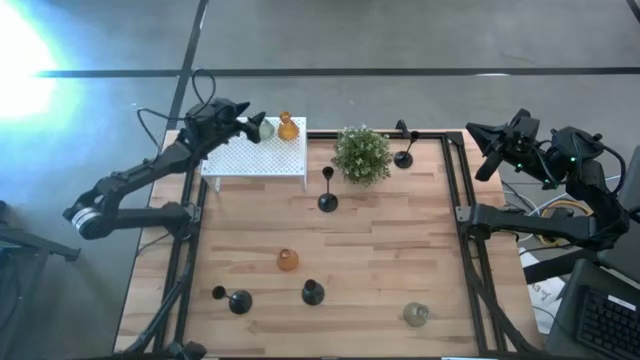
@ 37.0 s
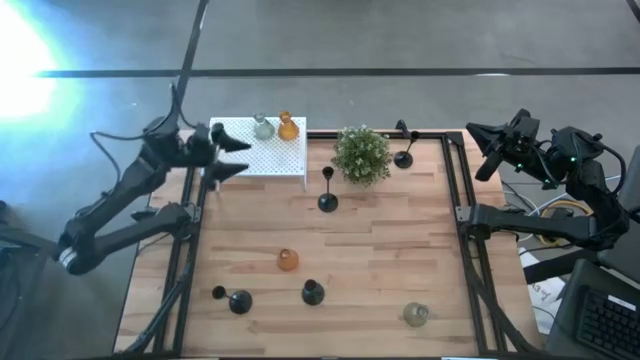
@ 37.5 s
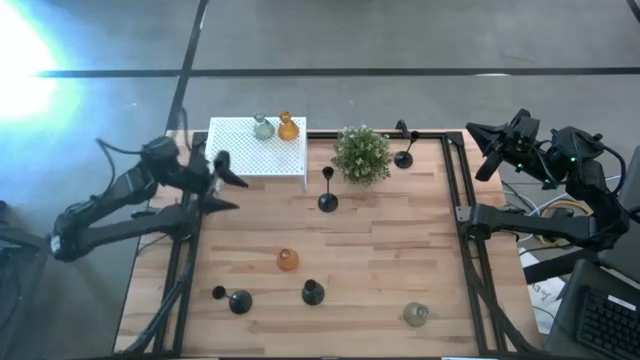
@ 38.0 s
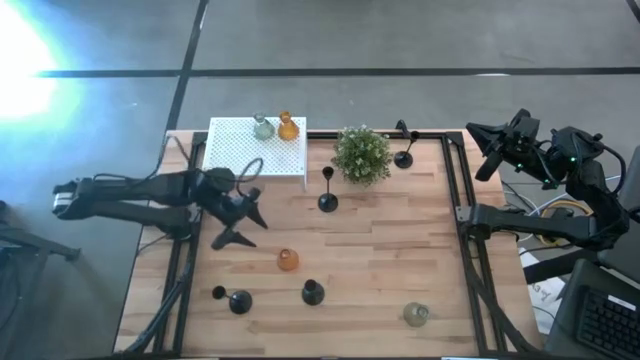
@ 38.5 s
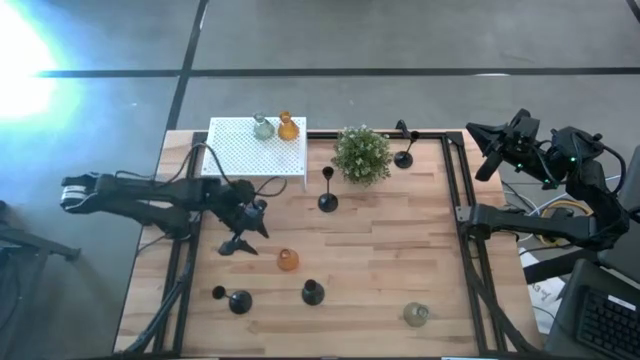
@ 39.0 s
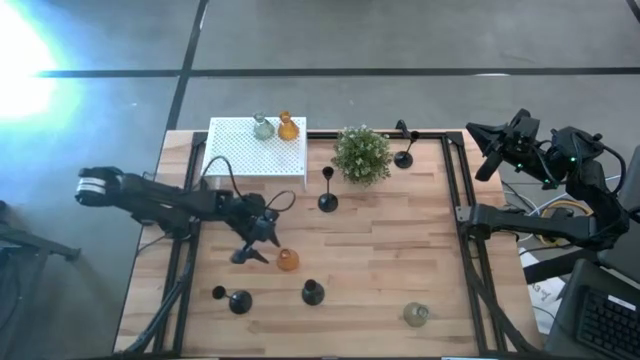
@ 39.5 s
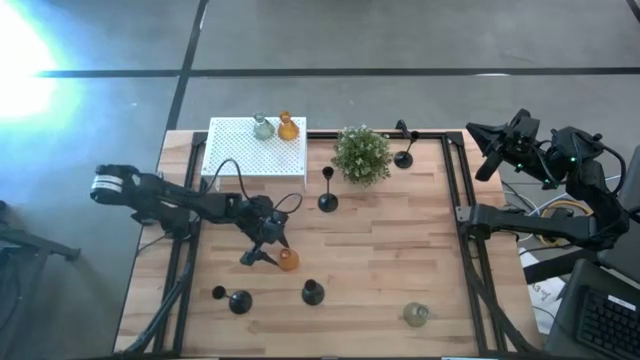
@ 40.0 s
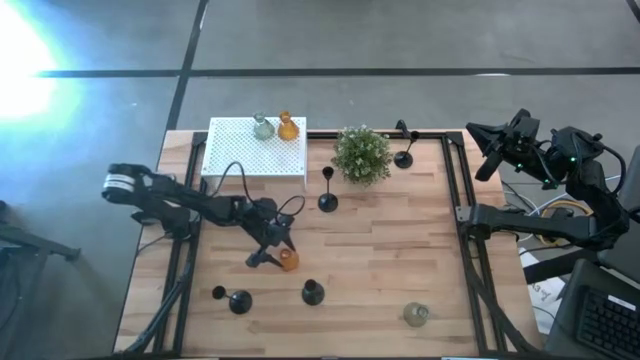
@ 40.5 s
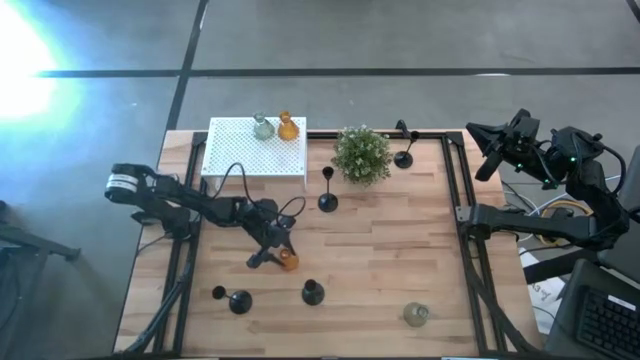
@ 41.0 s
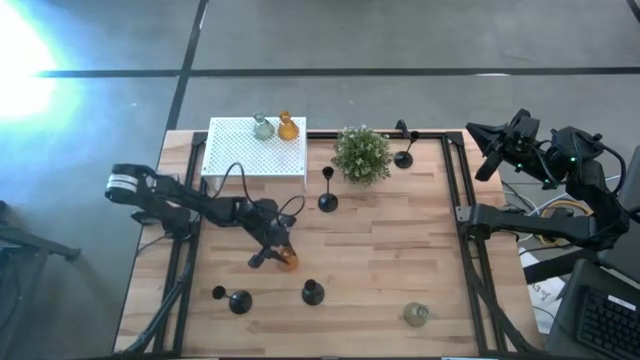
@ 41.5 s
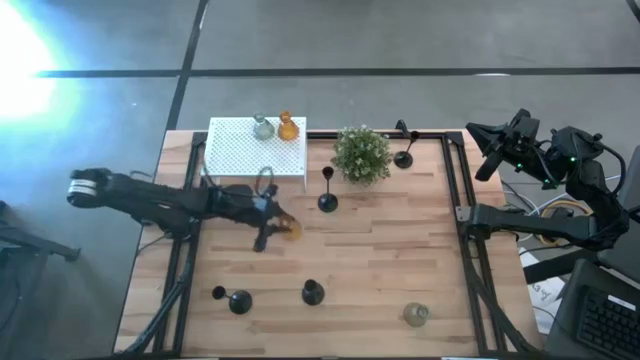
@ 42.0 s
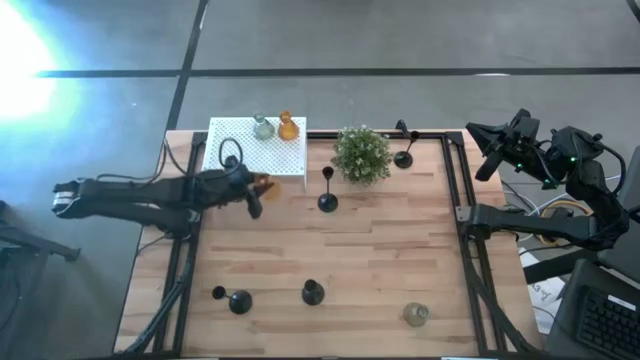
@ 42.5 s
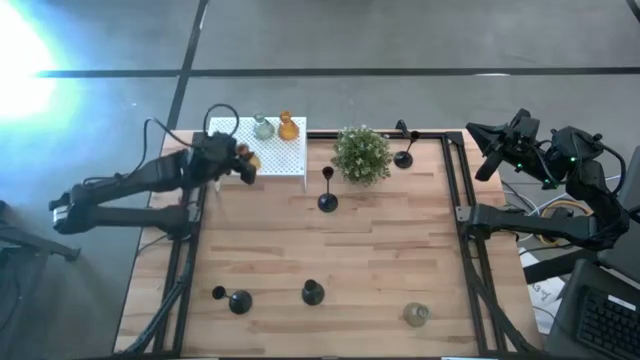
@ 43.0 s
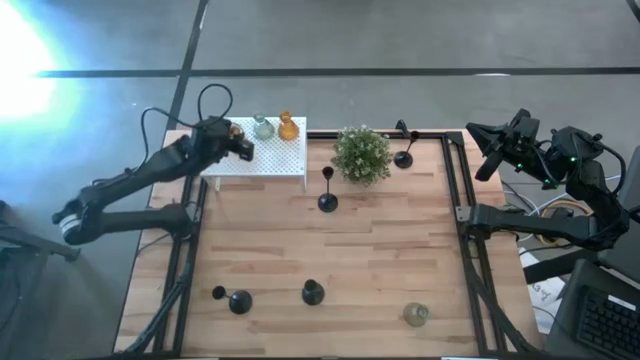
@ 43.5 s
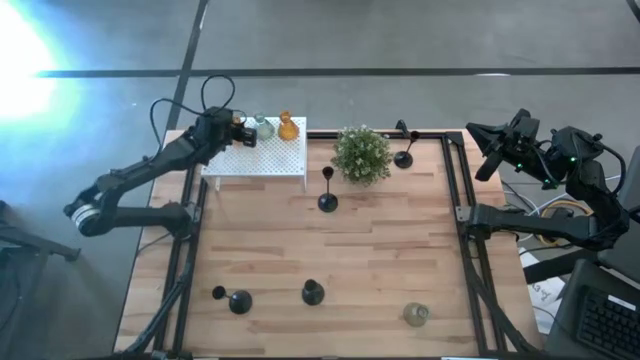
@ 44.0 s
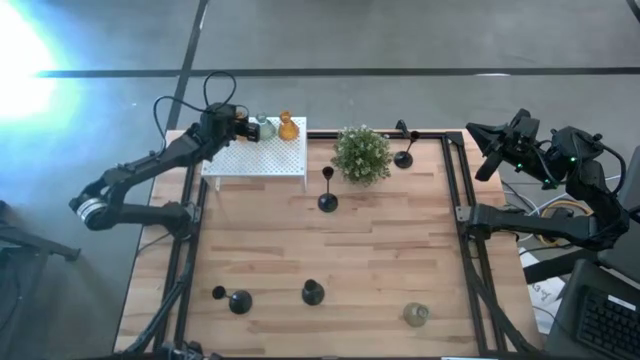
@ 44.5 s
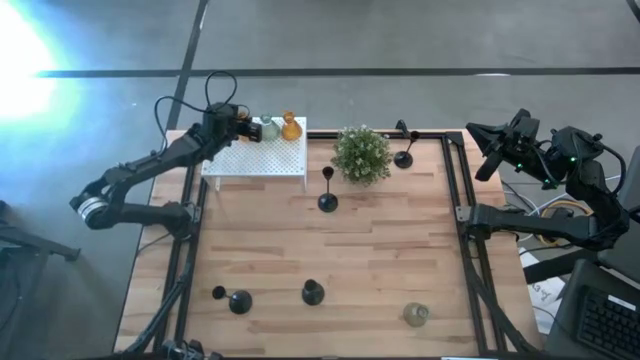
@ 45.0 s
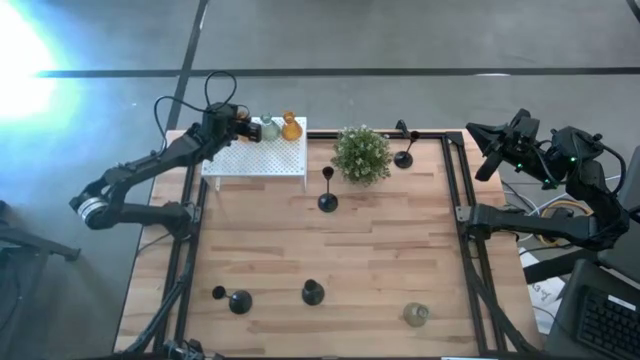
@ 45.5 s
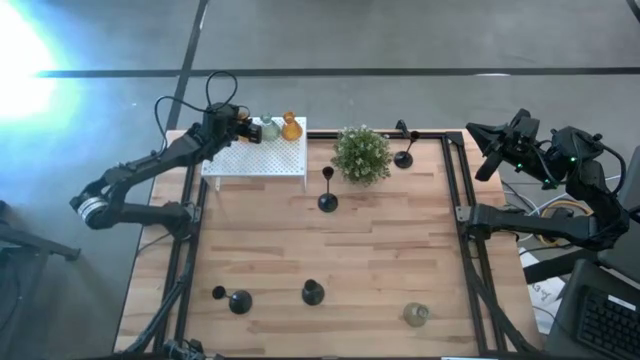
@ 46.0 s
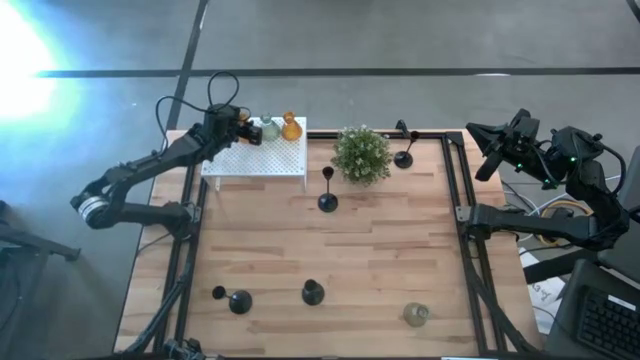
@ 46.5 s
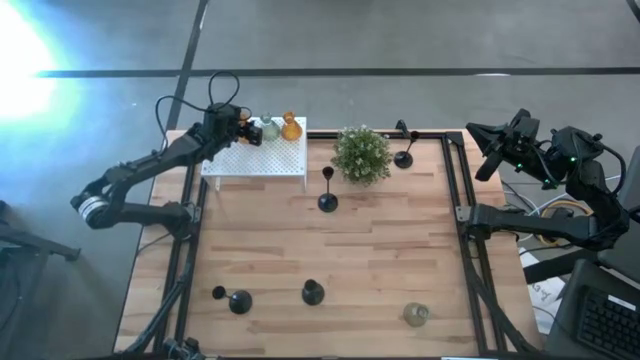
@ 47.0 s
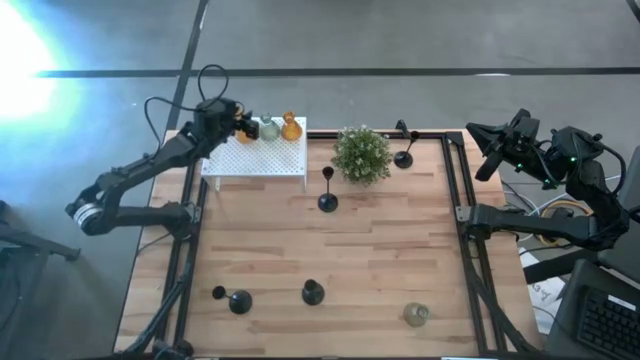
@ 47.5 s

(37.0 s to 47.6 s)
Task: Pick & Place candle stick holders
Put the yellow glass candle holder on the shelf

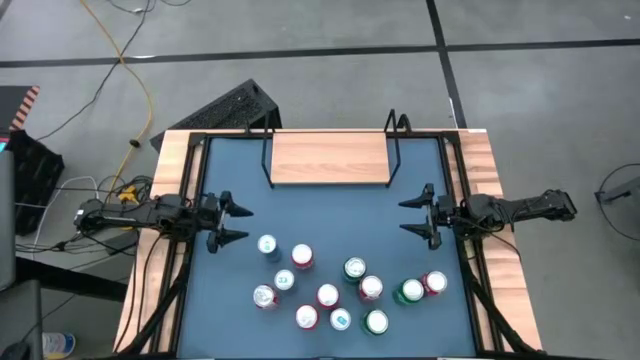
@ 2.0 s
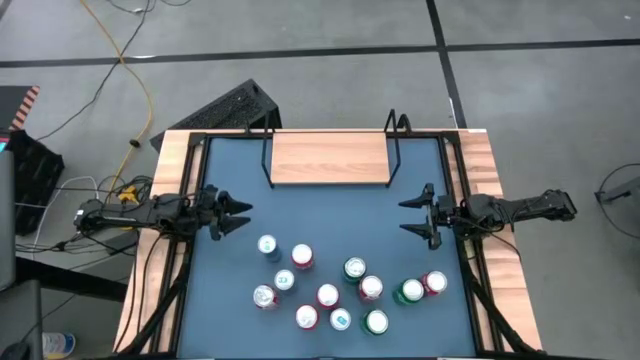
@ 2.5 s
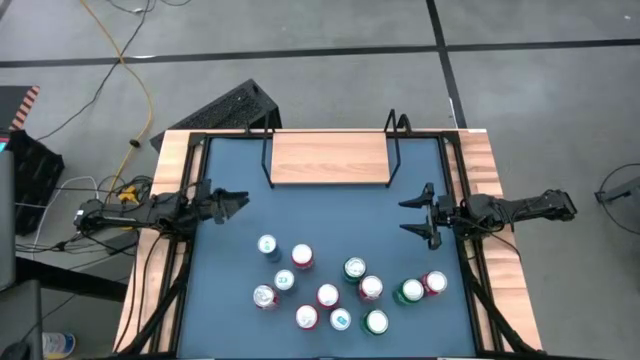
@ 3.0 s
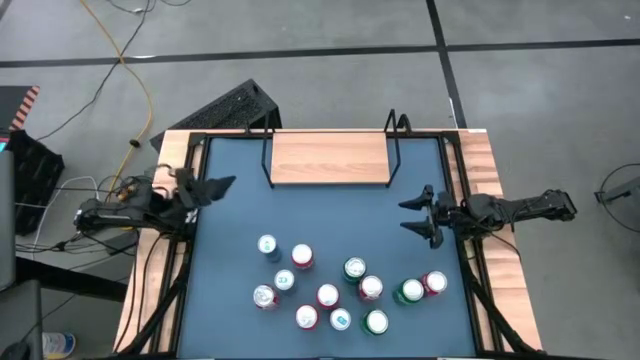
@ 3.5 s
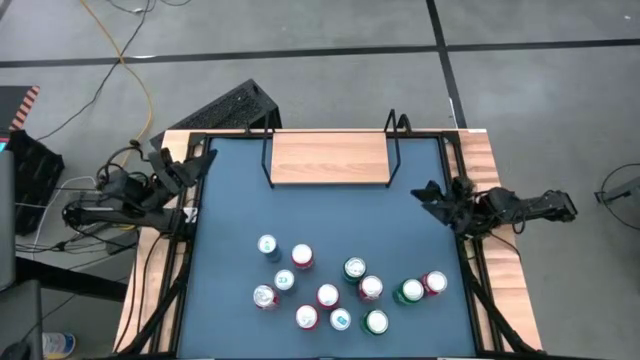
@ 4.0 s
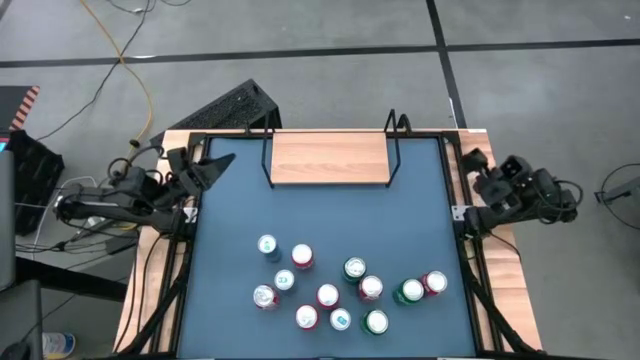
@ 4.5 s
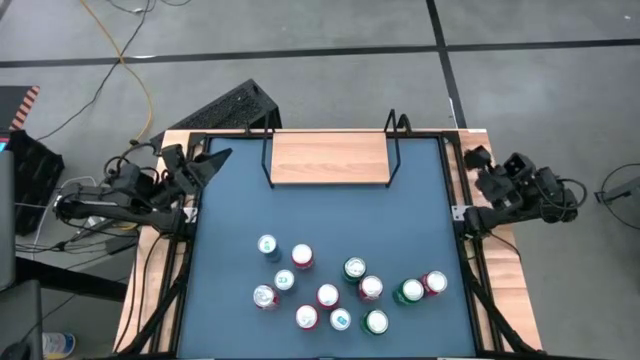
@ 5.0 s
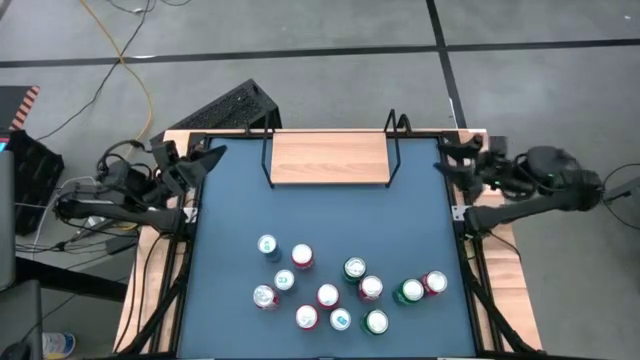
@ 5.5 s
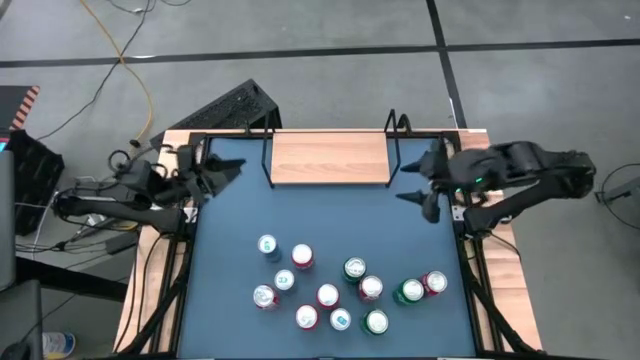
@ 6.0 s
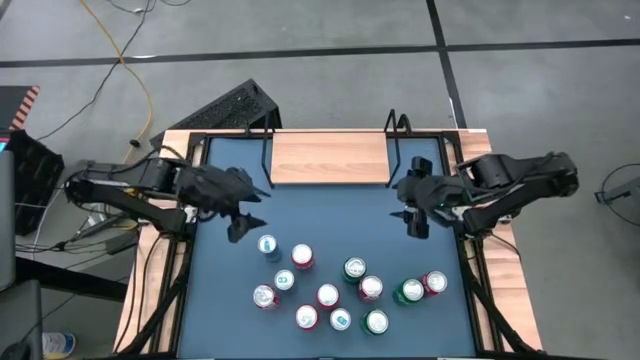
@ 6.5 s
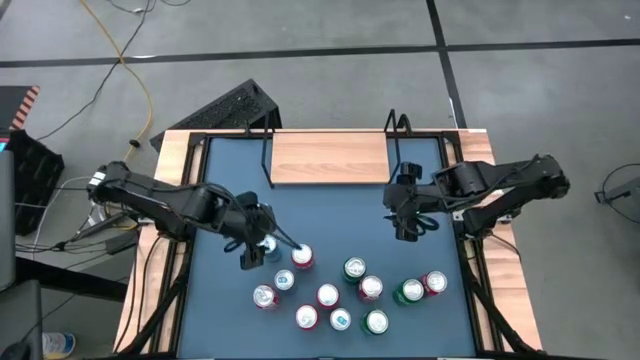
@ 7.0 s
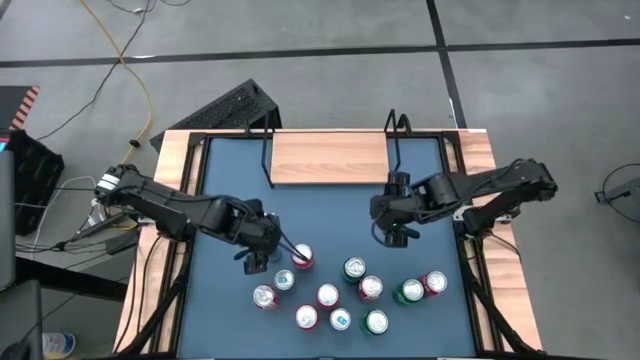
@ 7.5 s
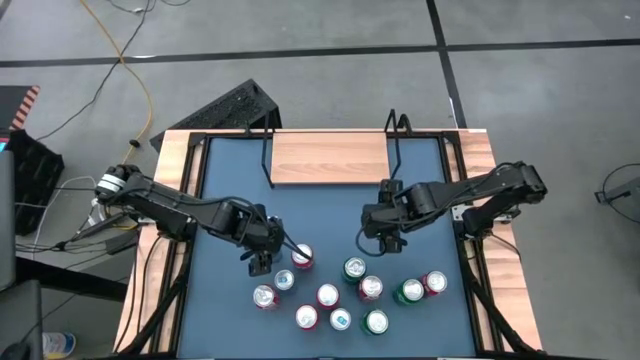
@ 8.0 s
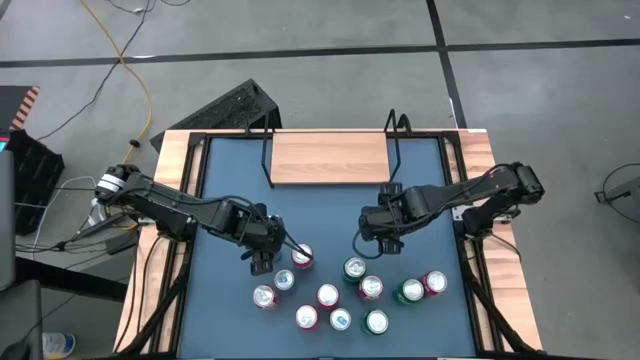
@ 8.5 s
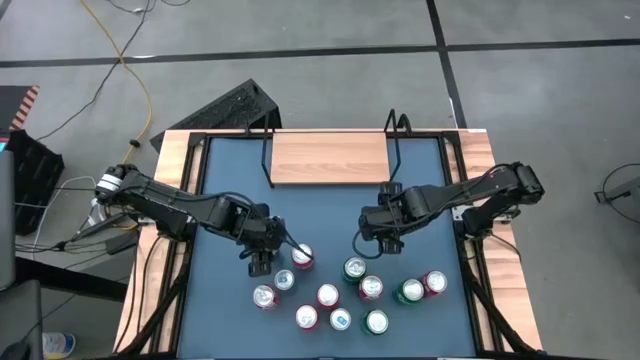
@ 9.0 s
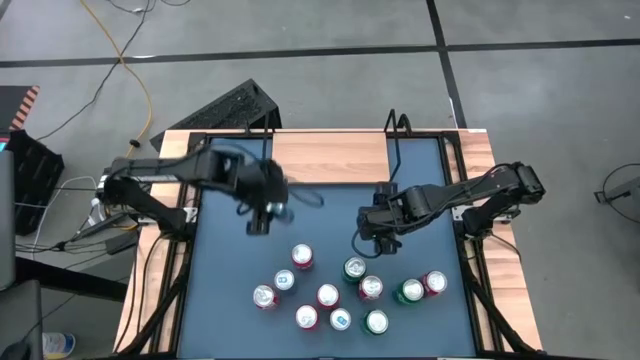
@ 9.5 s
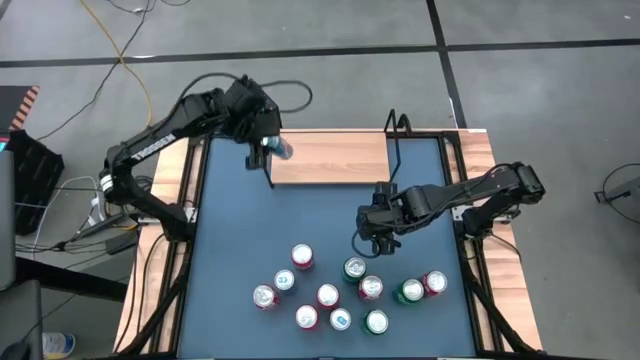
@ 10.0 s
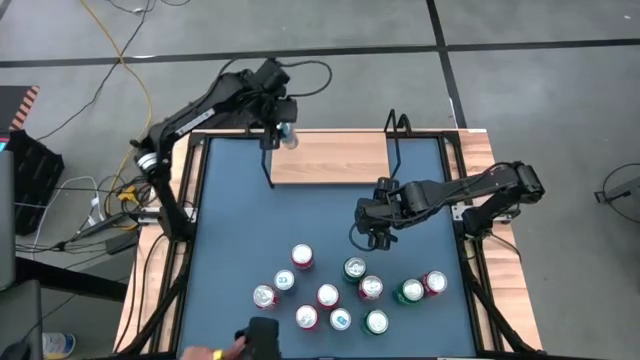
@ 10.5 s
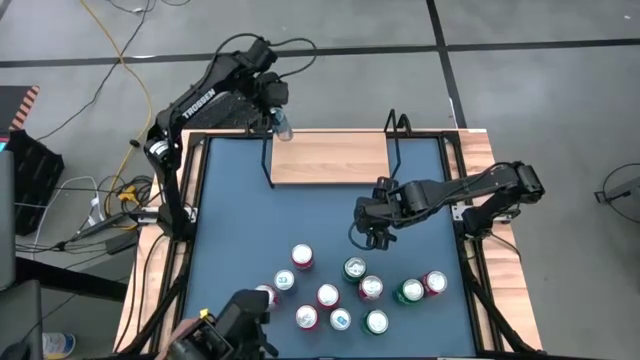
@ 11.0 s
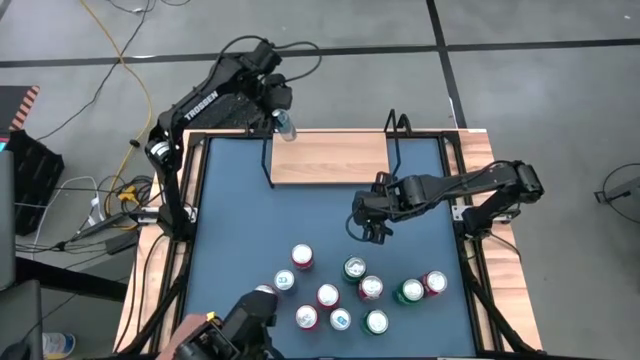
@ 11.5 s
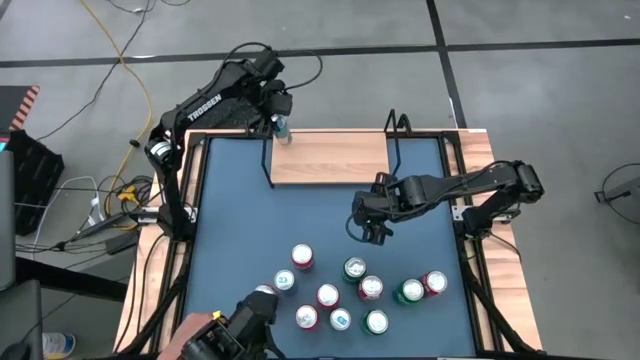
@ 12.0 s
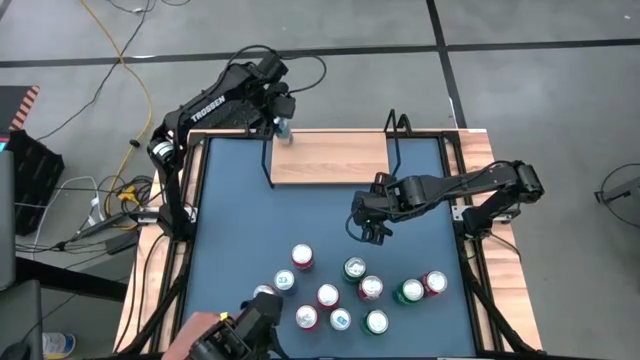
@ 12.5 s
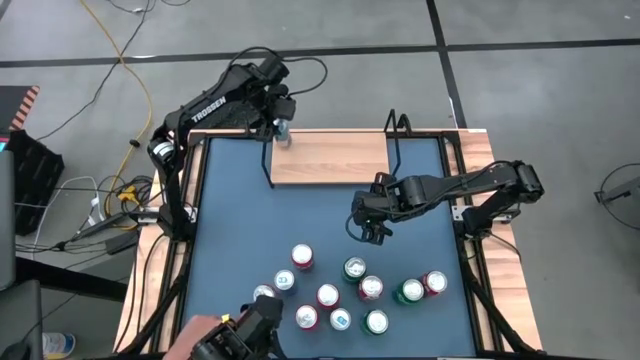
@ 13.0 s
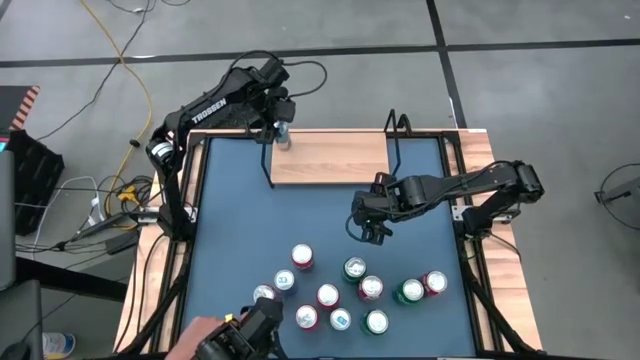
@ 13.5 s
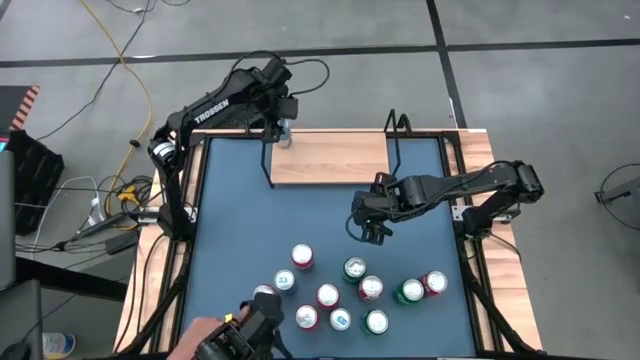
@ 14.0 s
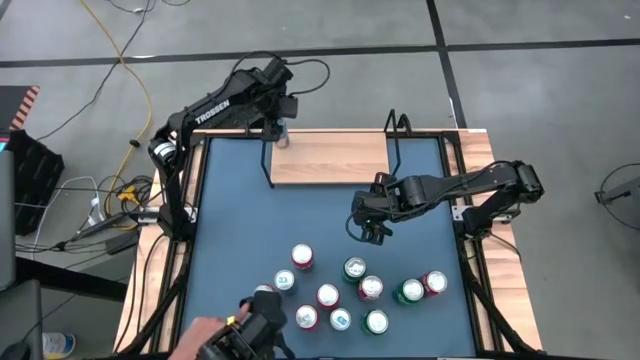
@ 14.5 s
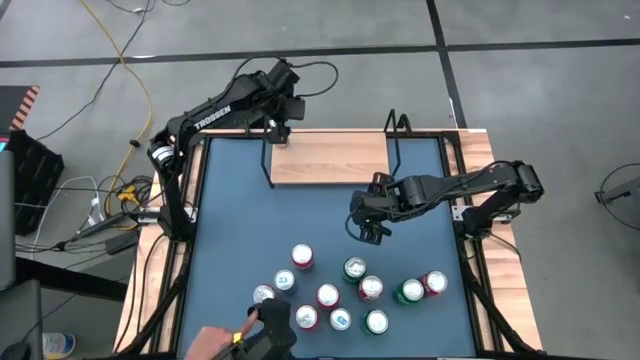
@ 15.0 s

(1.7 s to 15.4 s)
Task: Place canned beverage on shelf
Put the top blue soda can on the shelf
